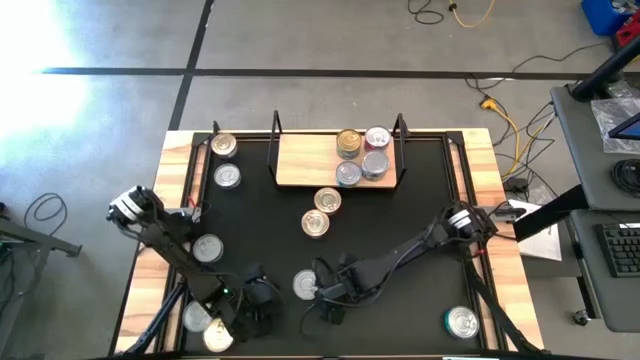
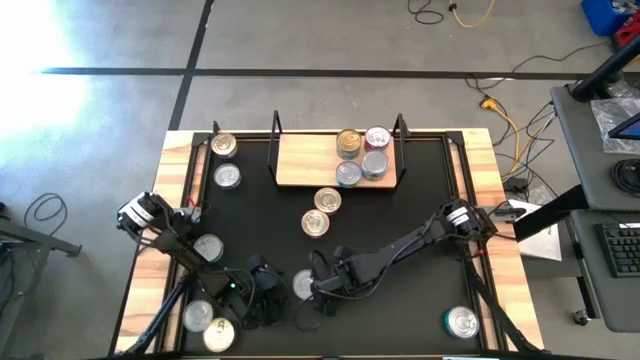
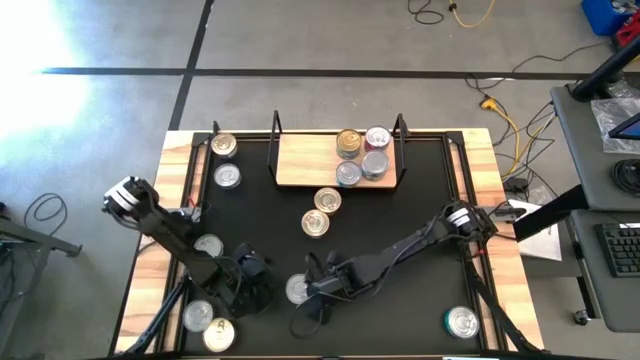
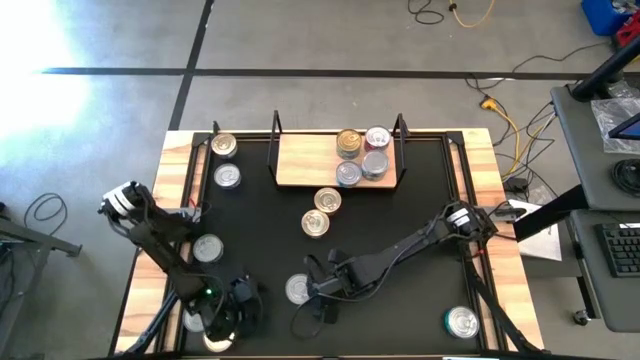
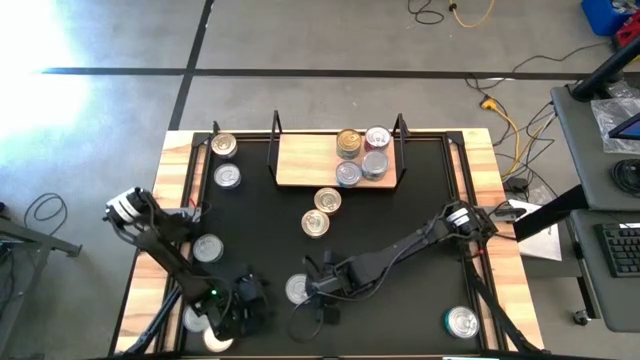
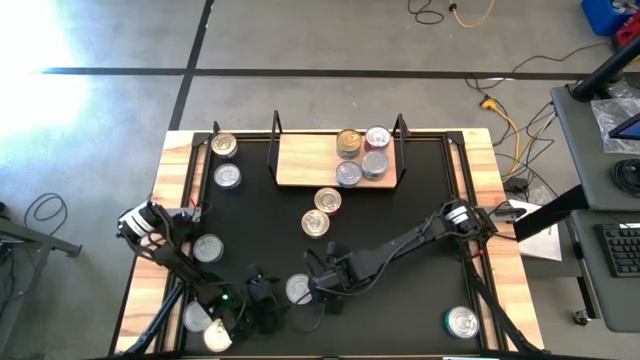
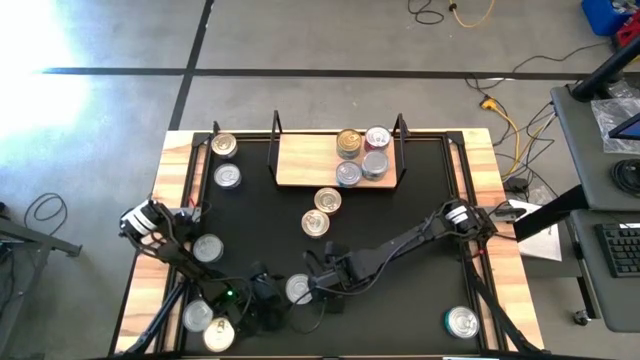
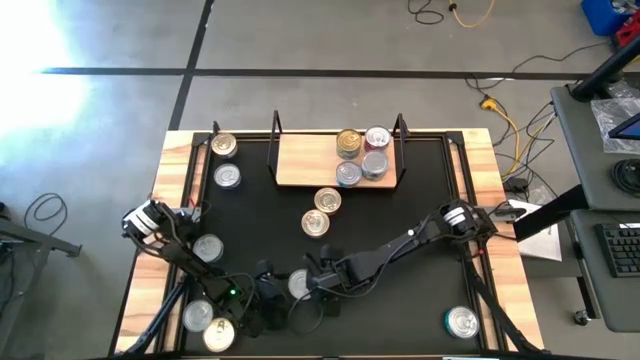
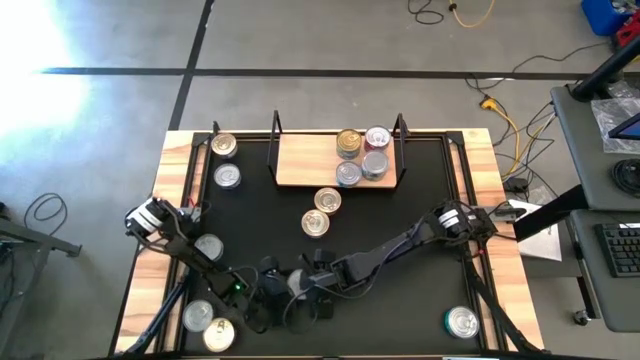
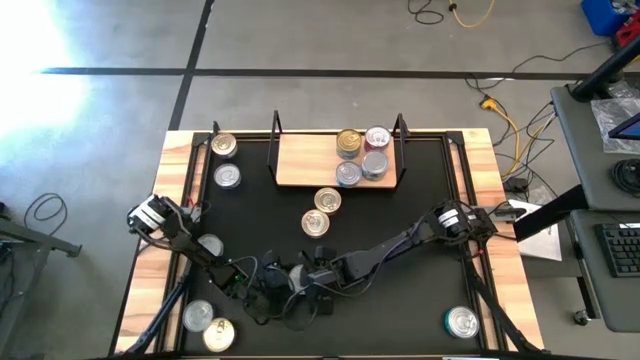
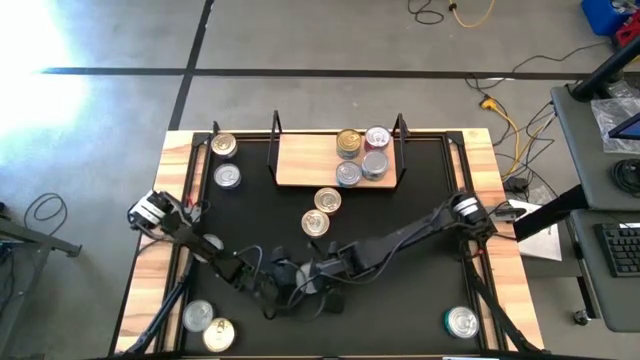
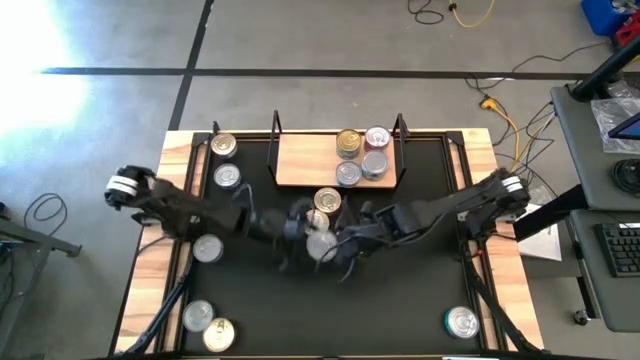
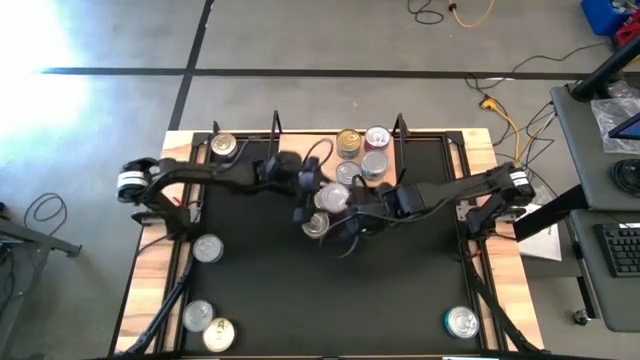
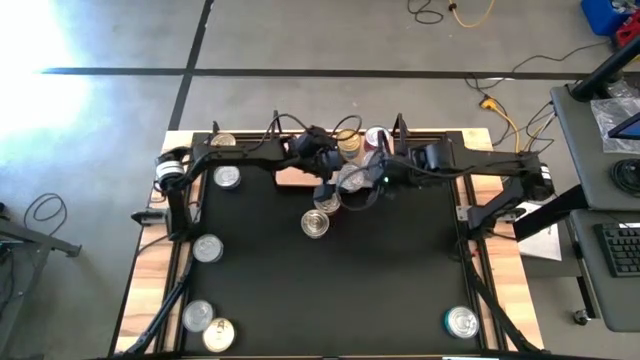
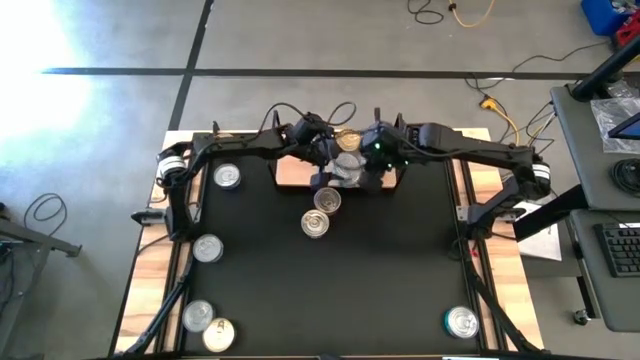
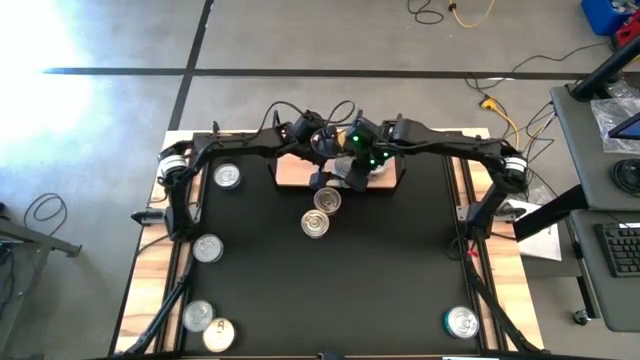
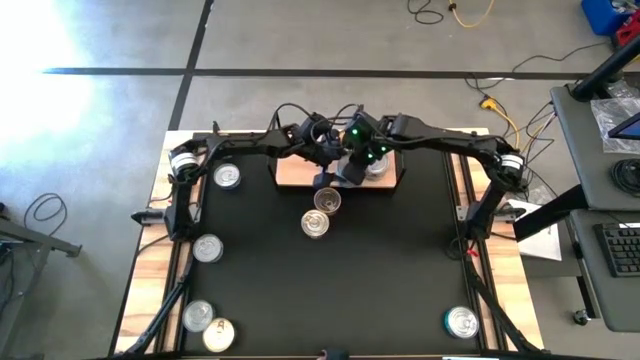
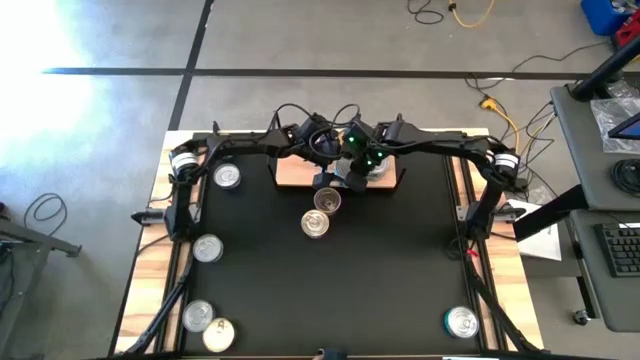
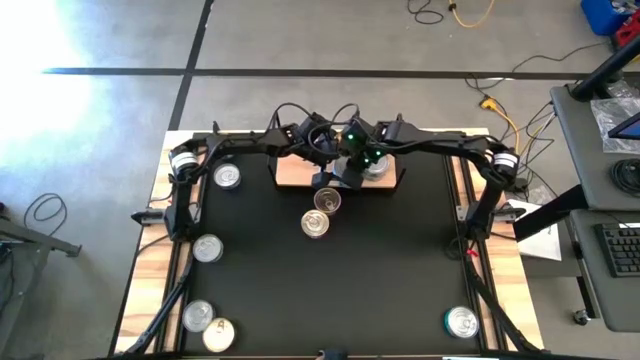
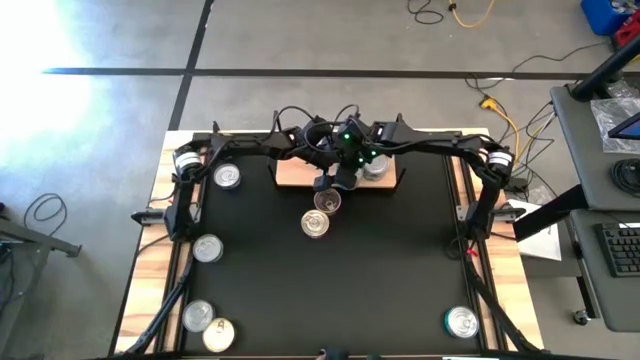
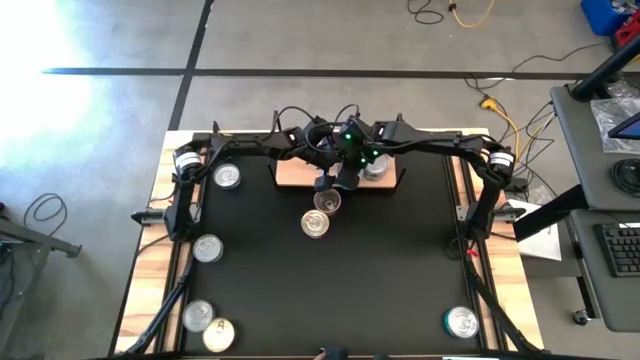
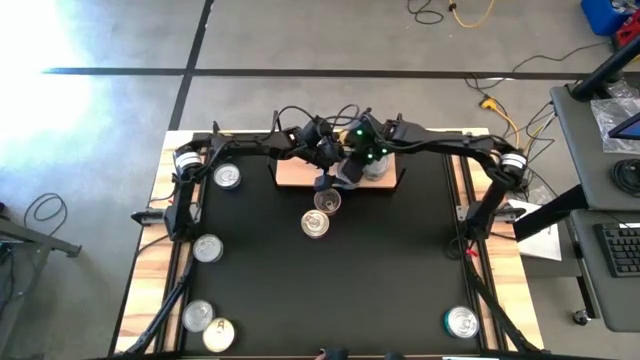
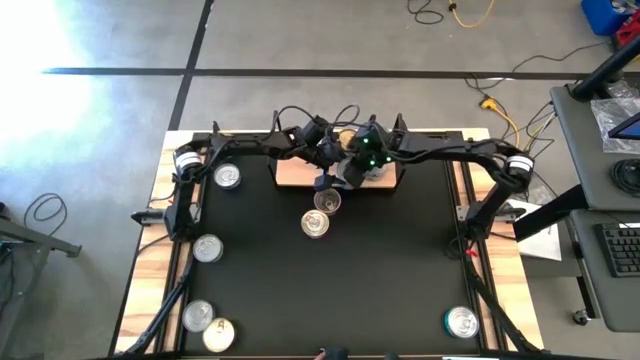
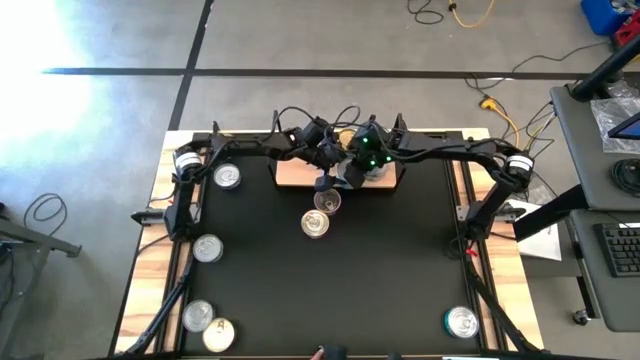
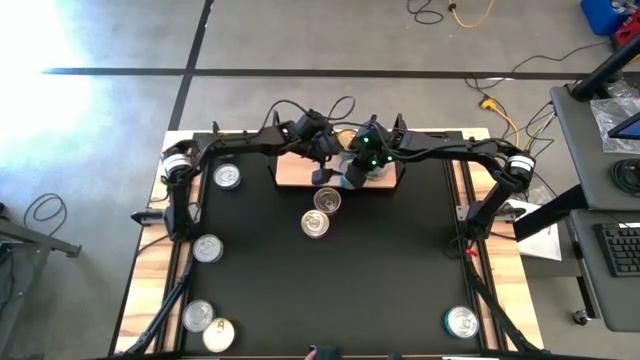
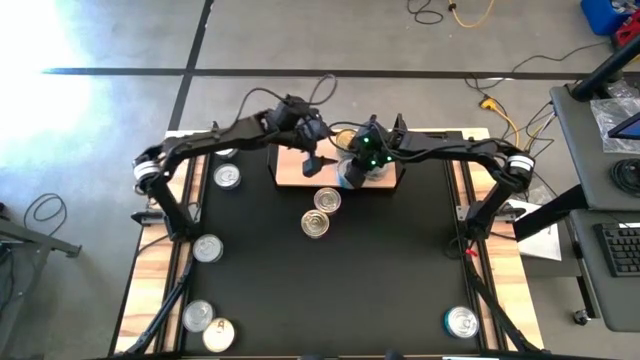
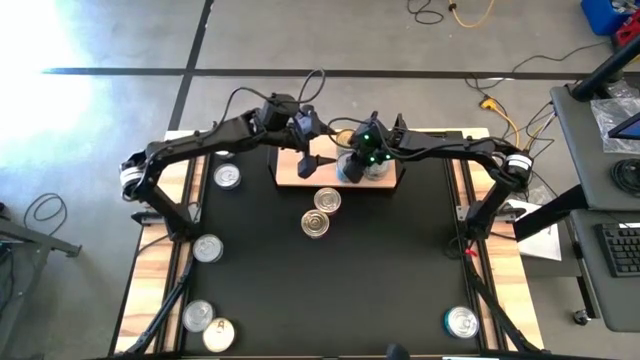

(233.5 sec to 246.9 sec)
Task: Stack canned seafood by type on shelf
Stack the yellow-blue tuna can on top of the other yellow-blue tuna can on the shelf

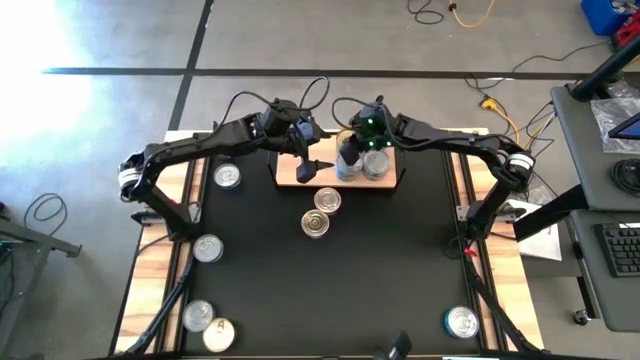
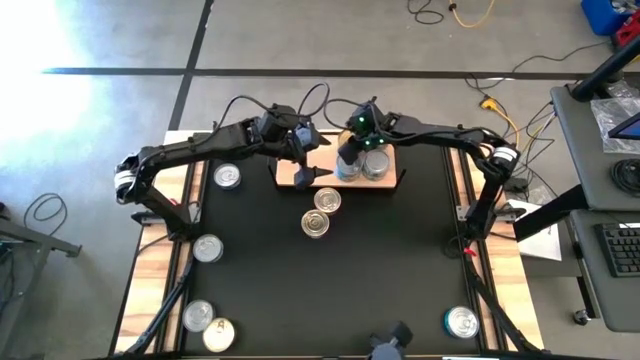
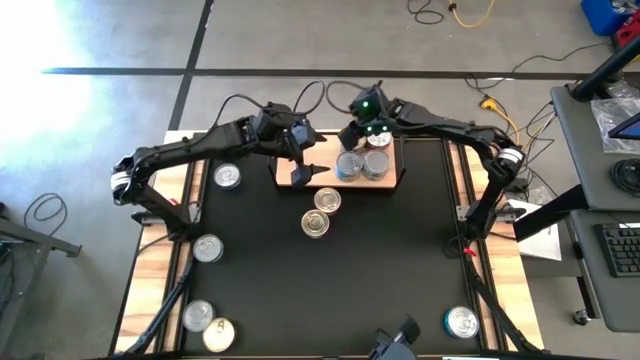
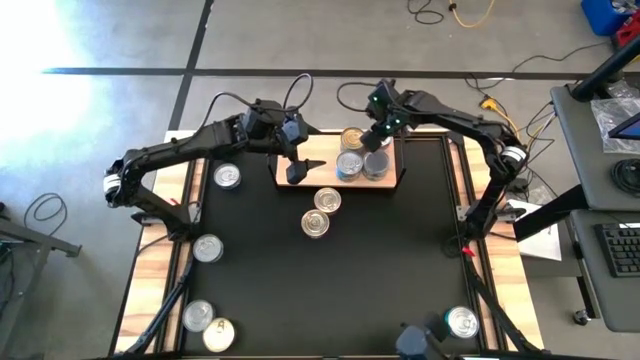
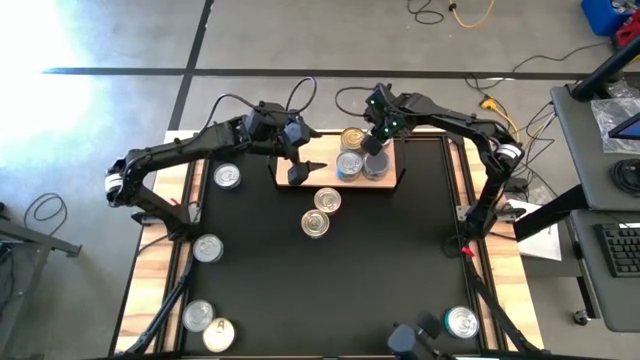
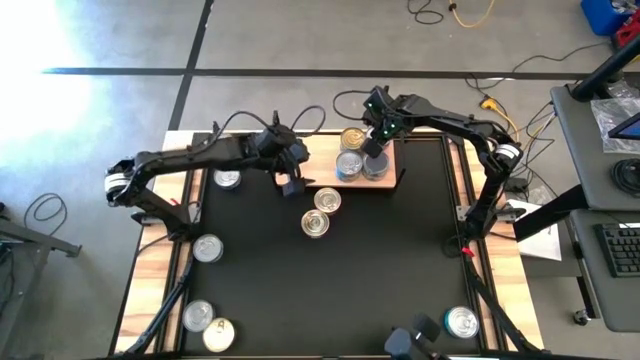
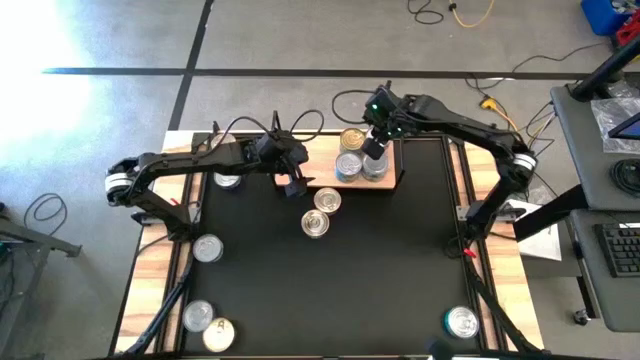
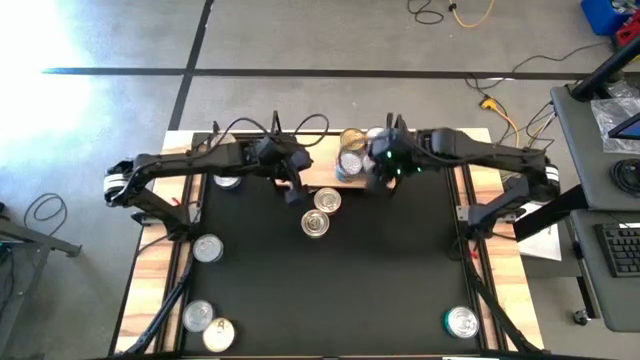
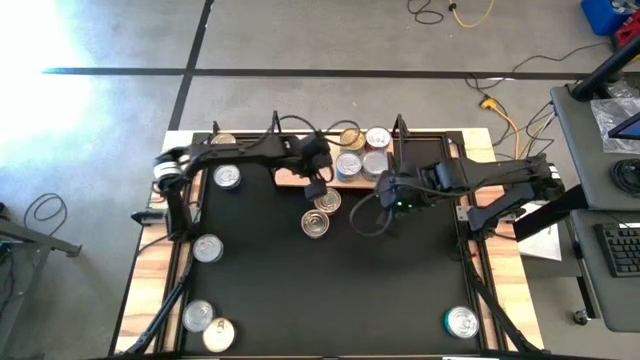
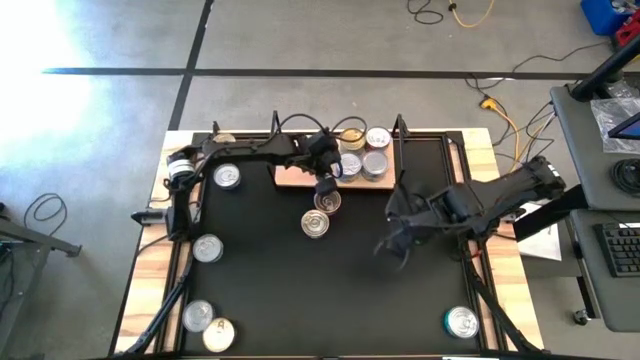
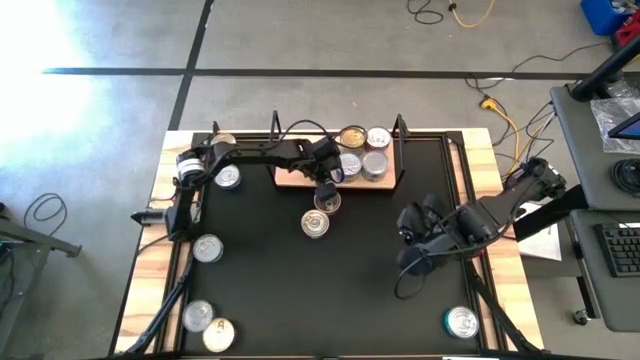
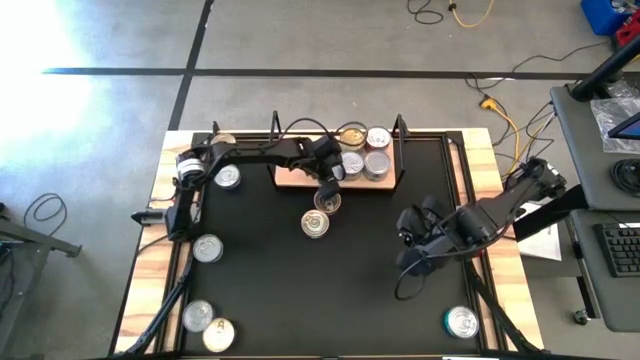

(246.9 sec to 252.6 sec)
Adjust the tuna cans on the shelf
